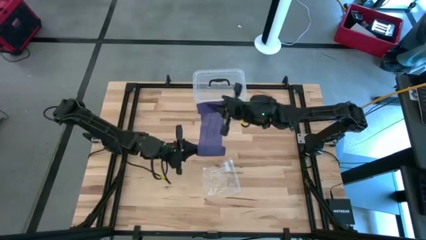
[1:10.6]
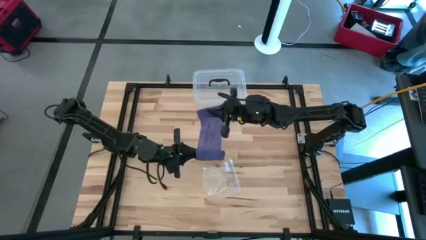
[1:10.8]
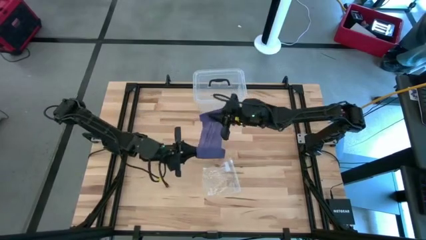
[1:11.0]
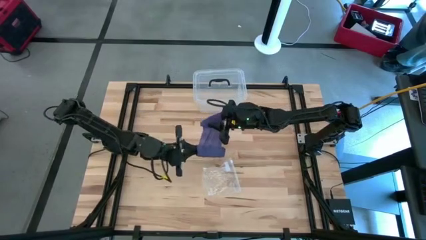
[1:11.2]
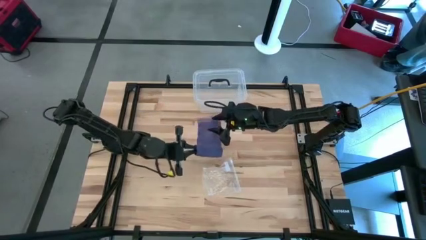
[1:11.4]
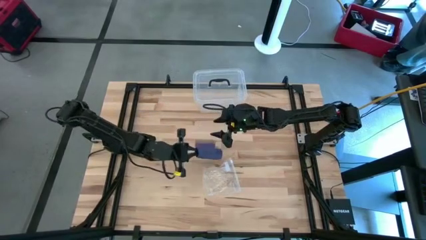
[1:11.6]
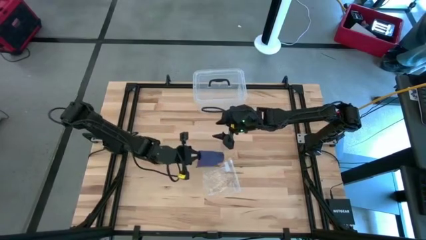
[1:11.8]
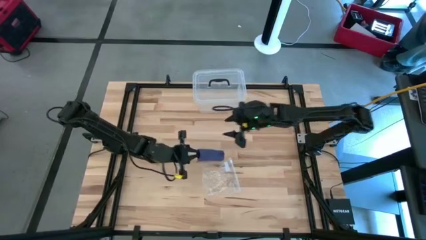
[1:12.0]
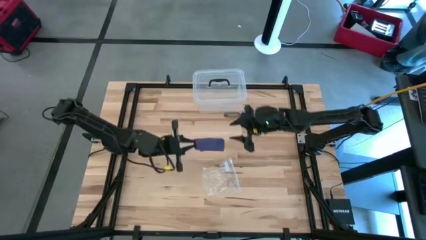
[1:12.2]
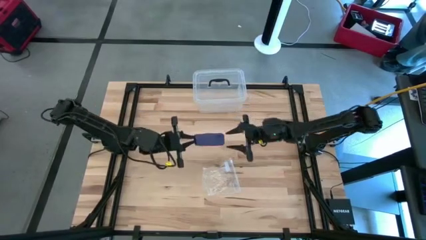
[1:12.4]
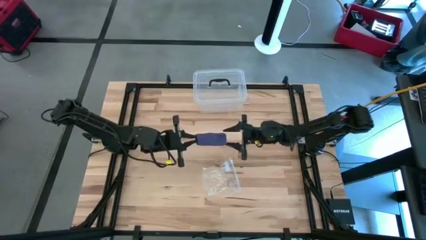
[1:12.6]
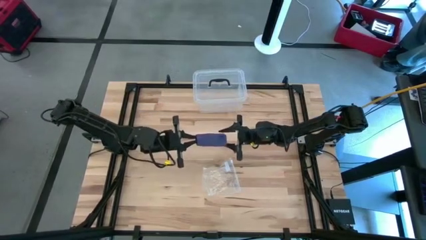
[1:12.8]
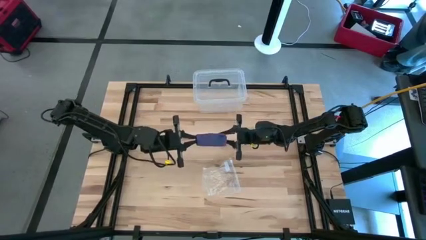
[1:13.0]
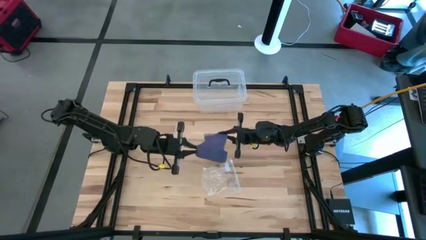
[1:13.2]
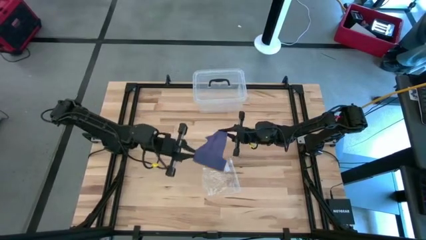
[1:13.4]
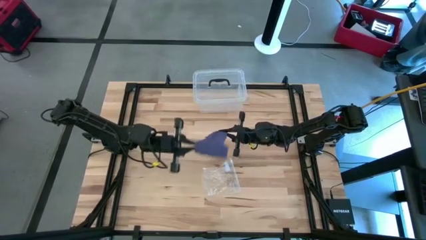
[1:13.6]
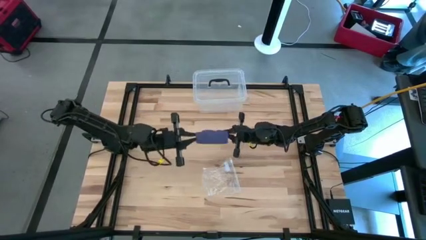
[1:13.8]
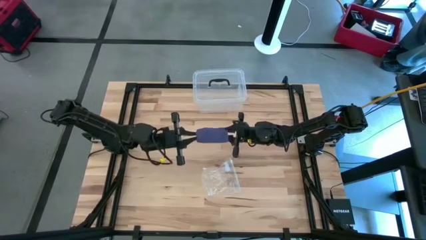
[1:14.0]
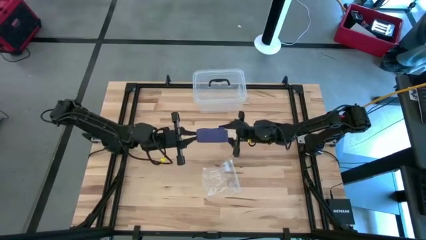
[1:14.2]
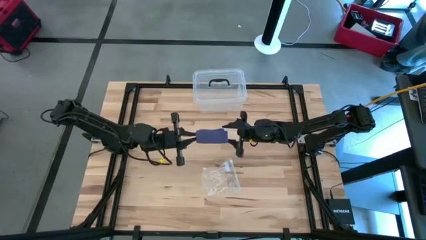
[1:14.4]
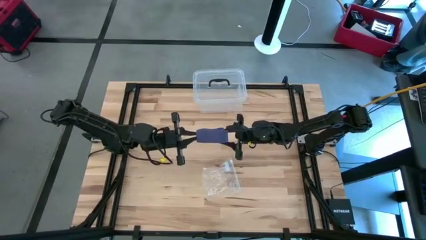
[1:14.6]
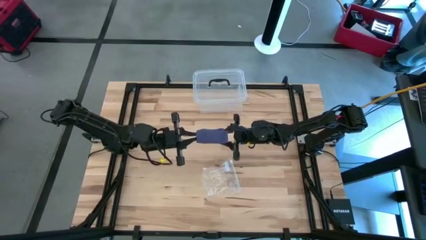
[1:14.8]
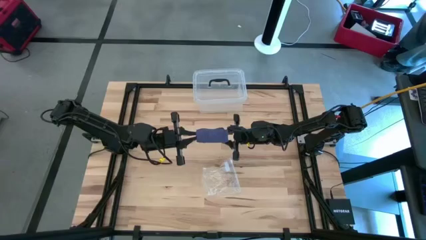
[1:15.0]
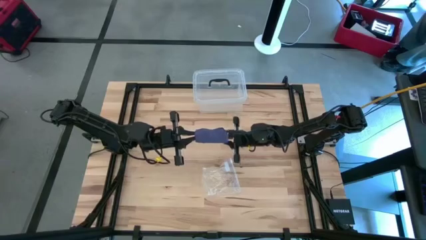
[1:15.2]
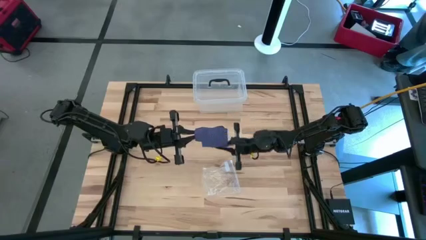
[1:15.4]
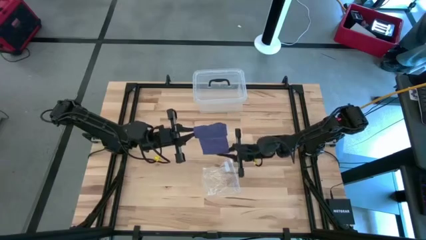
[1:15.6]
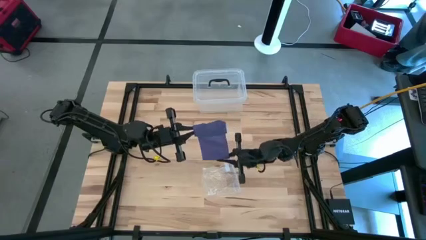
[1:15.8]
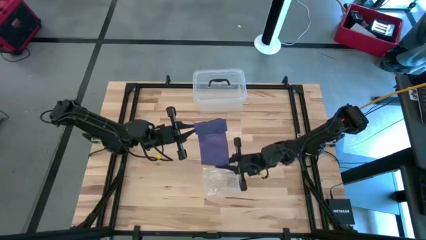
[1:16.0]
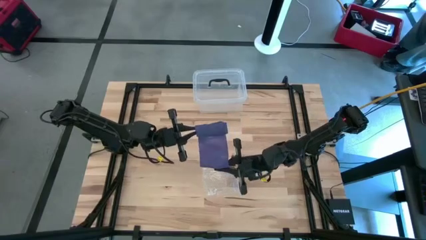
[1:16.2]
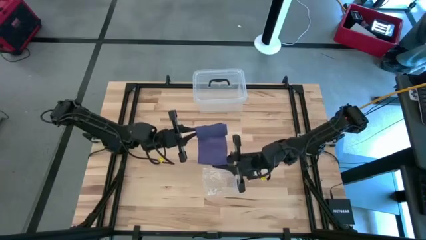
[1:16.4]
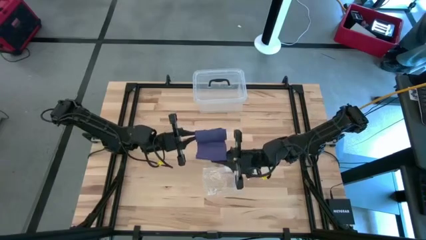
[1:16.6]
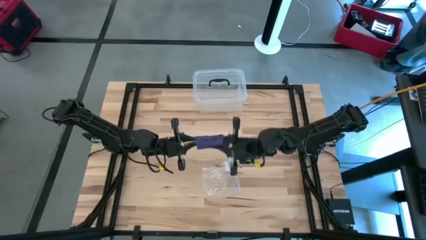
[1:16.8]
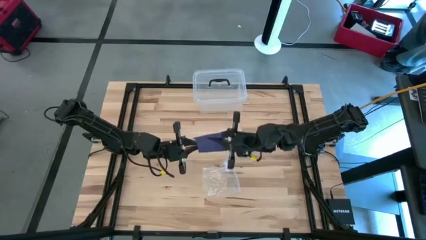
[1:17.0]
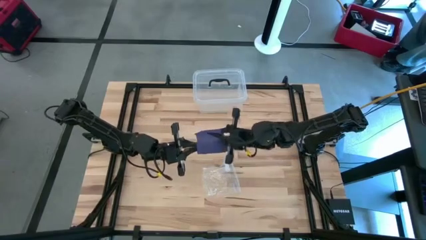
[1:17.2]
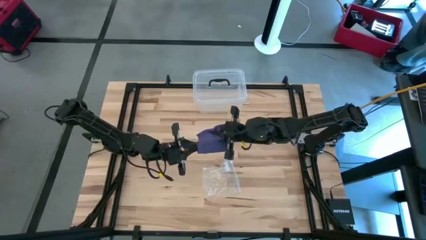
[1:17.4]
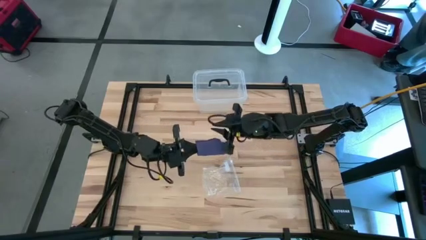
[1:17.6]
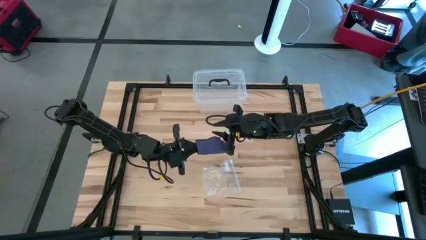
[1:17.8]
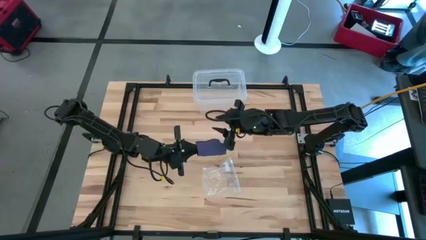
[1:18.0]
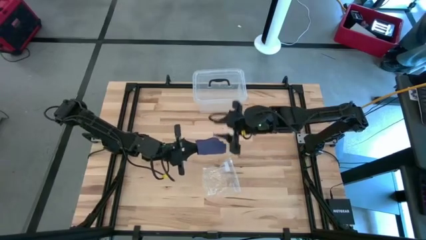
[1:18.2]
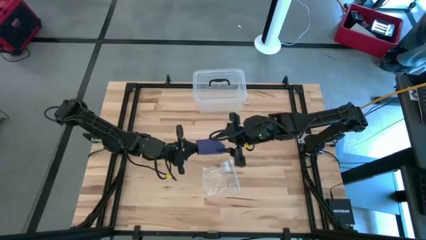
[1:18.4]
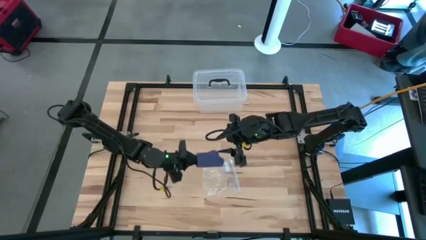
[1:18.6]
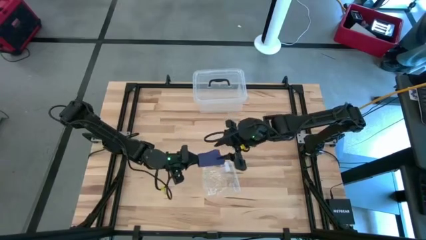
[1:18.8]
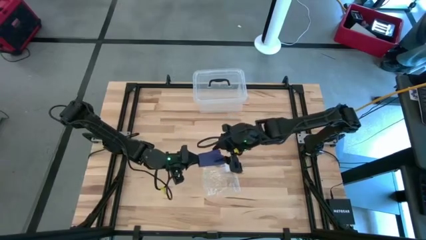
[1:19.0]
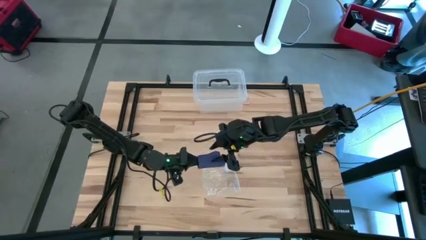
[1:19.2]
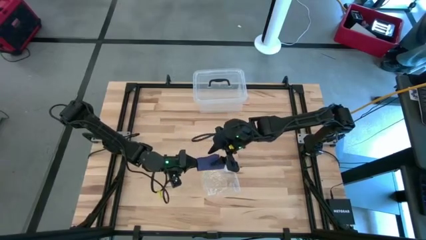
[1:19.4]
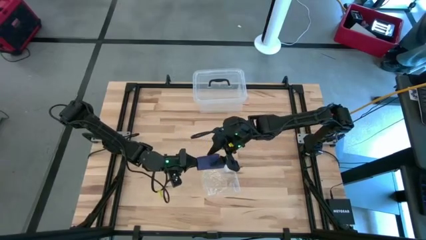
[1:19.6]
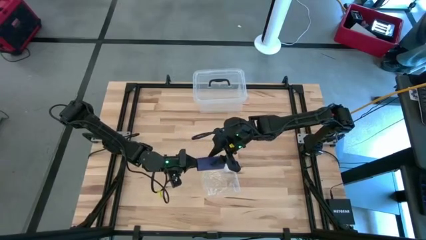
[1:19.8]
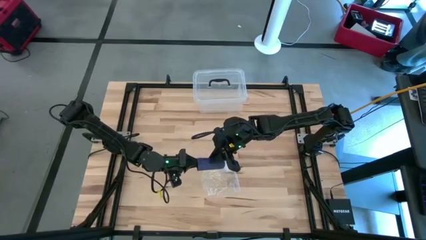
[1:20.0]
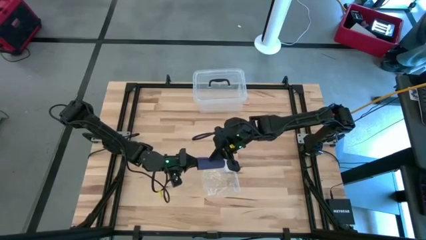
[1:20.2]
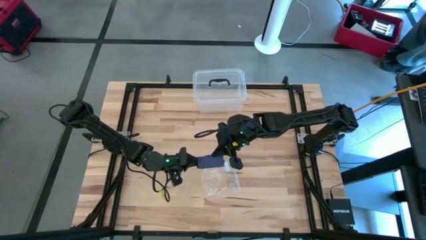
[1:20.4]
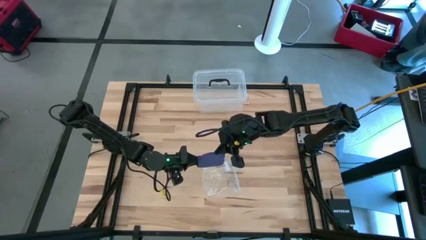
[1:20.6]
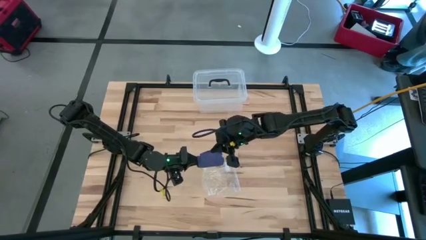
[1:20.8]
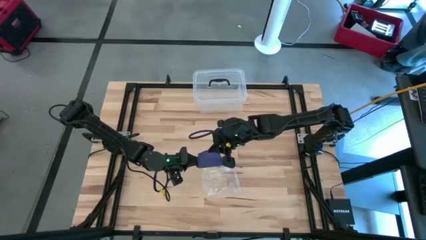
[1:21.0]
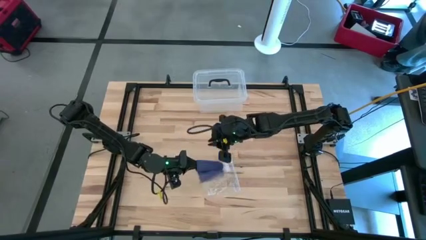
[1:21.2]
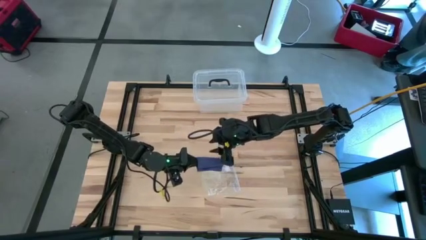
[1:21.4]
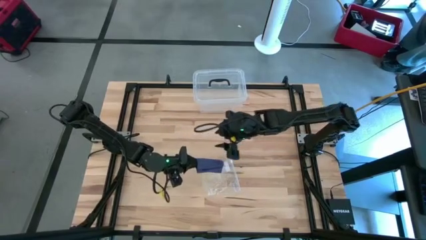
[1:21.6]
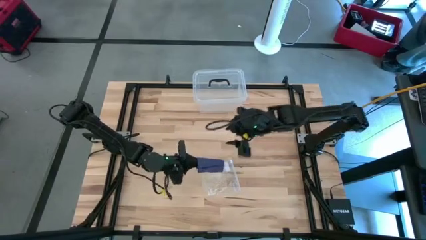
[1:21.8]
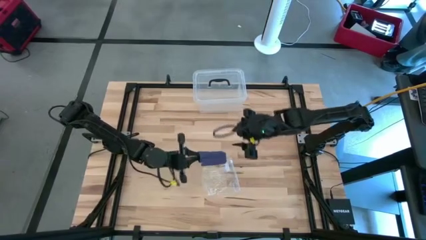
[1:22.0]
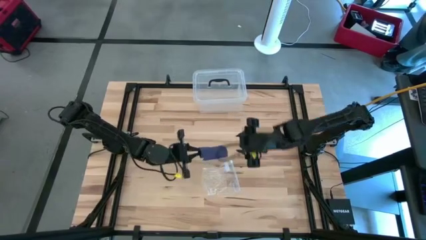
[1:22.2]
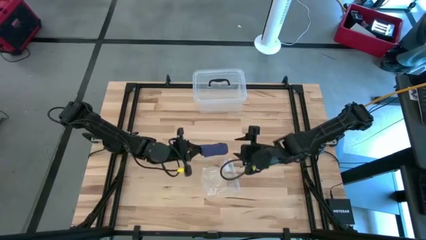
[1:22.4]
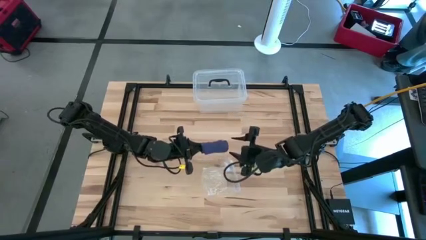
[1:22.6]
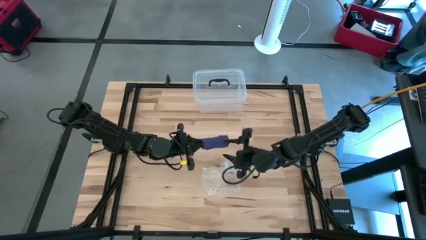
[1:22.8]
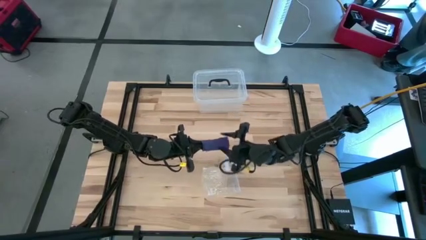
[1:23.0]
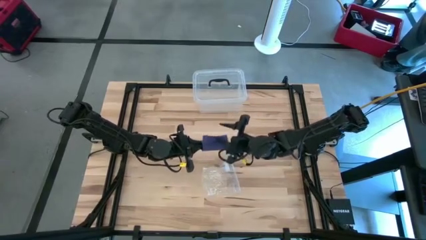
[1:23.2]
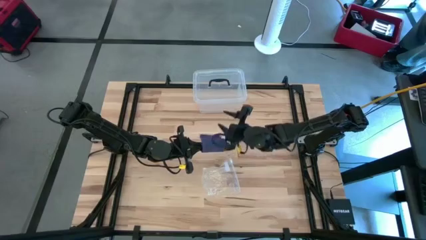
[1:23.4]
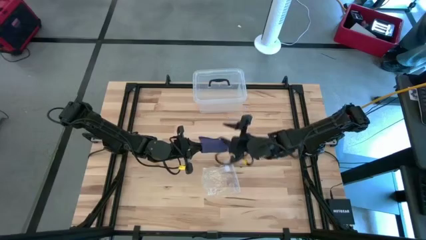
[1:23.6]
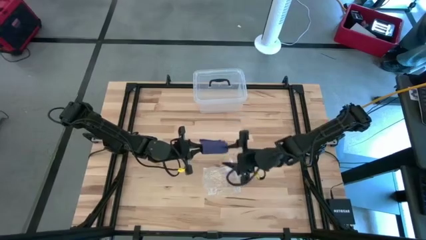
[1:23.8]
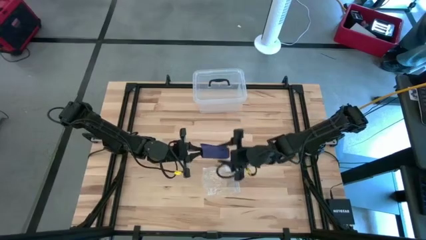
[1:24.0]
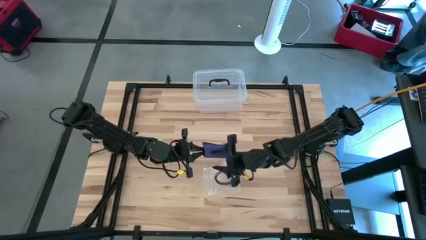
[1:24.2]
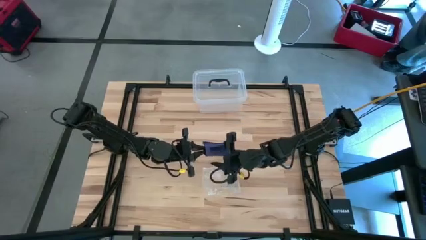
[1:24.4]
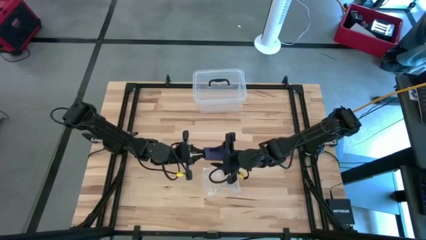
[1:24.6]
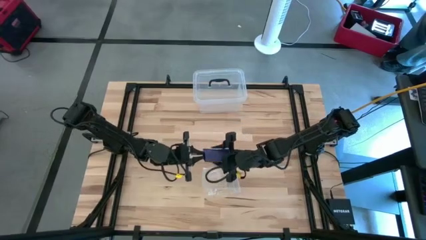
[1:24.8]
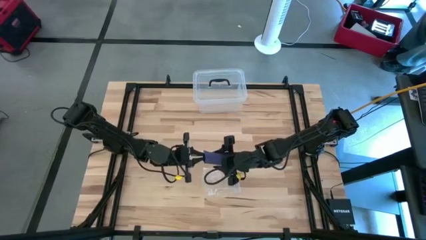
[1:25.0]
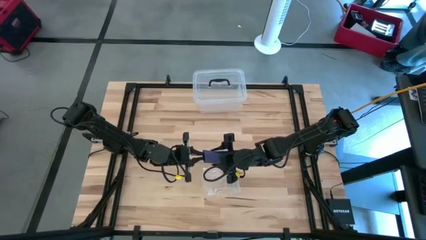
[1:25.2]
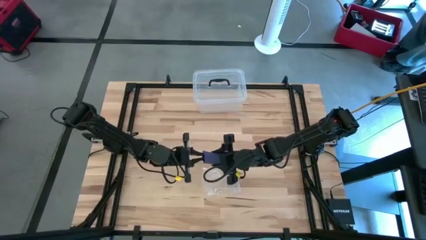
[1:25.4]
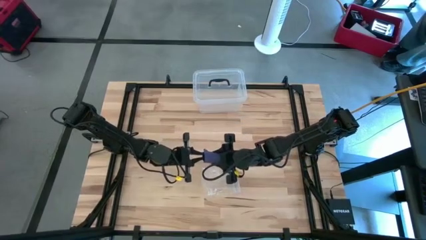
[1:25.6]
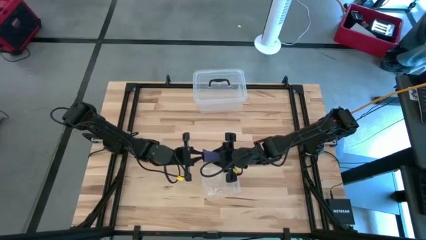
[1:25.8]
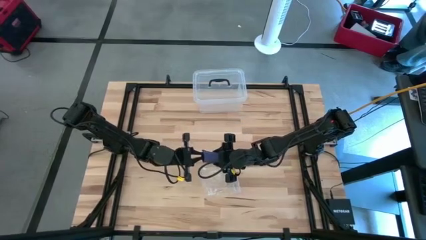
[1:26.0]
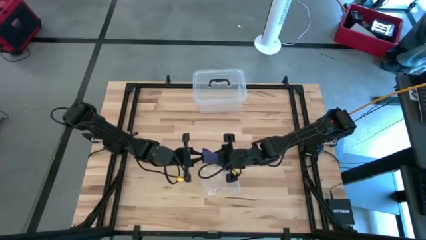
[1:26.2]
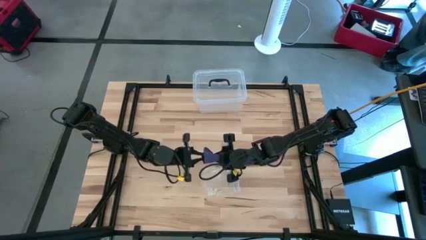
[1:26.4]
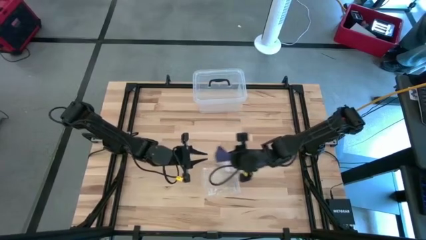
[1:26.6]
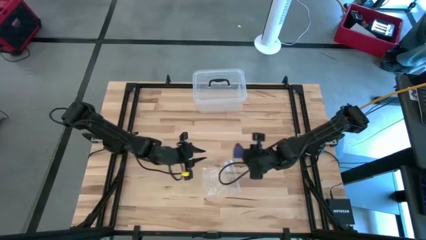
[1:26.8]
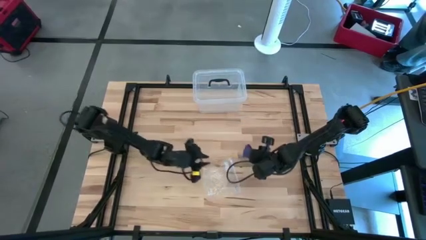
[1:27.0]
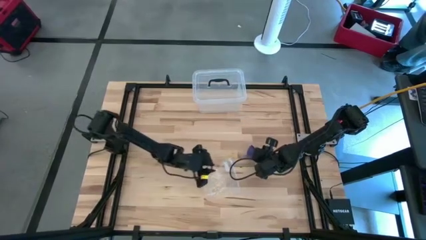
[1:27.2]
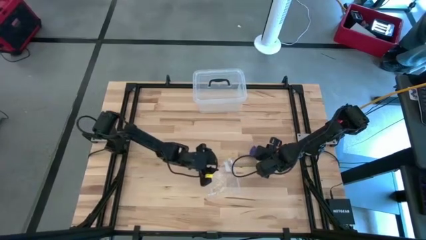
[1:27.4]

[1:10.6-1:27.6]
Task: Roll bandage
Roll the violet bandage
